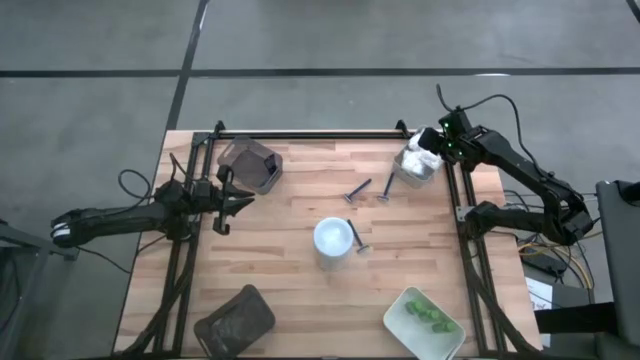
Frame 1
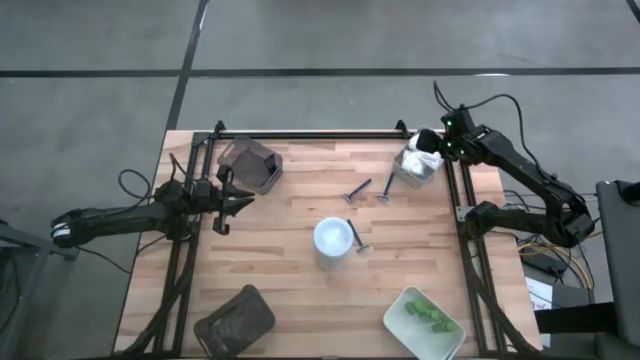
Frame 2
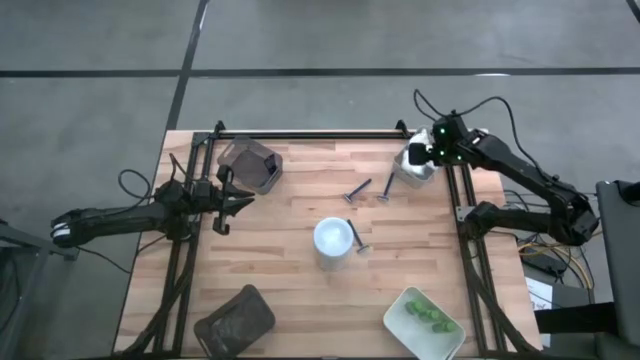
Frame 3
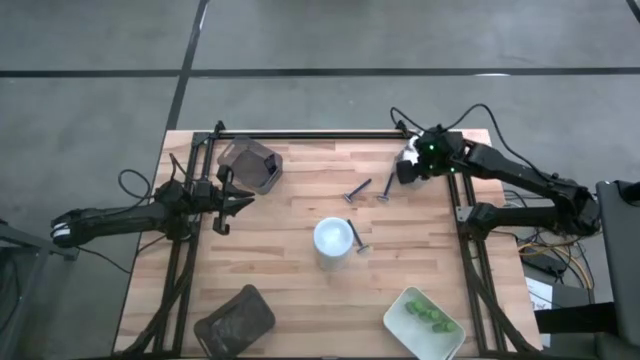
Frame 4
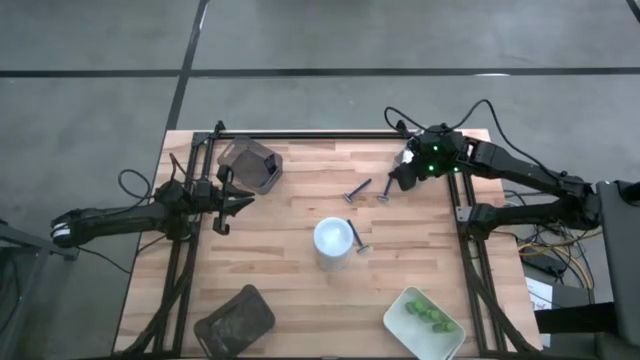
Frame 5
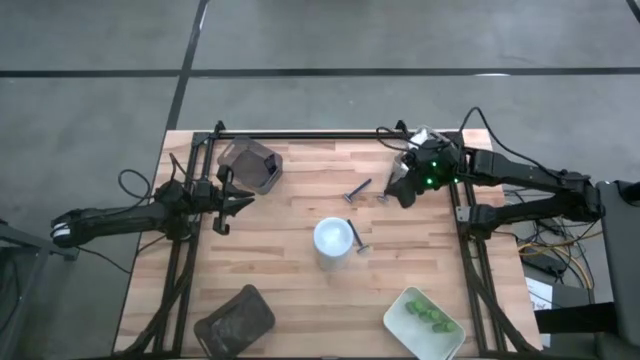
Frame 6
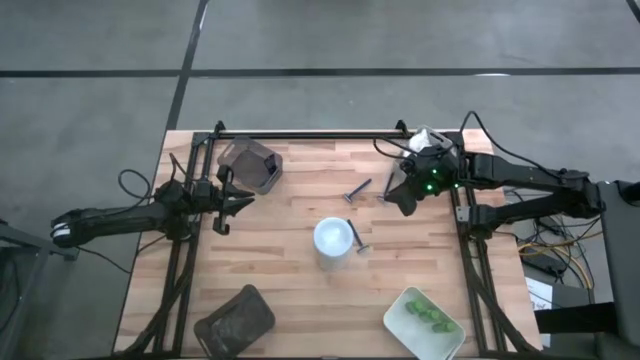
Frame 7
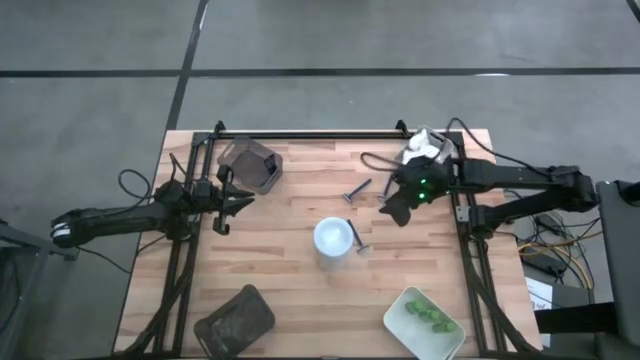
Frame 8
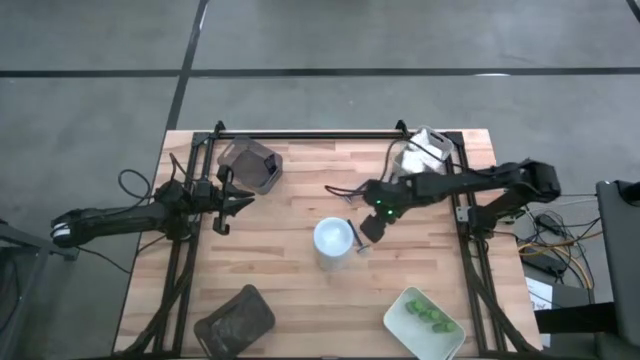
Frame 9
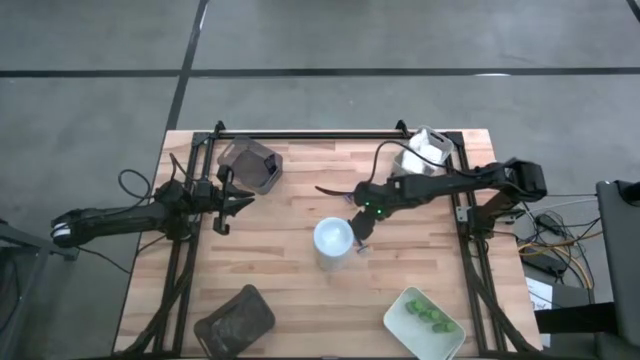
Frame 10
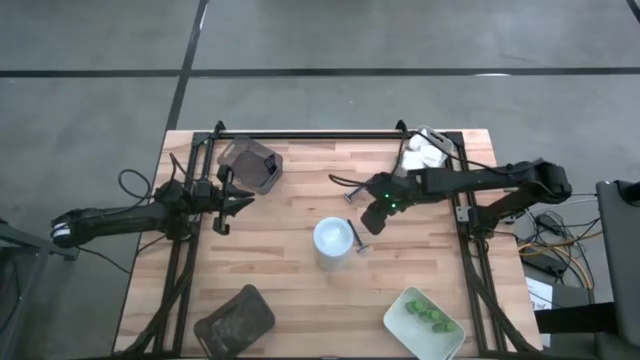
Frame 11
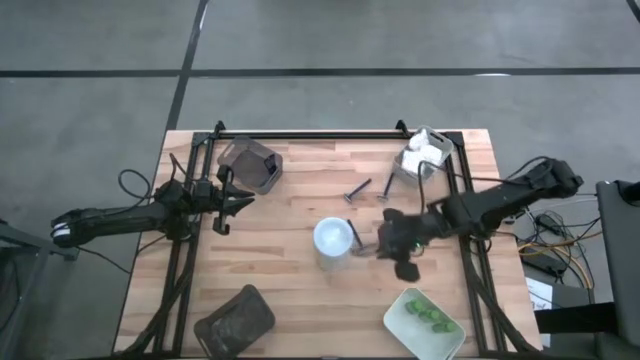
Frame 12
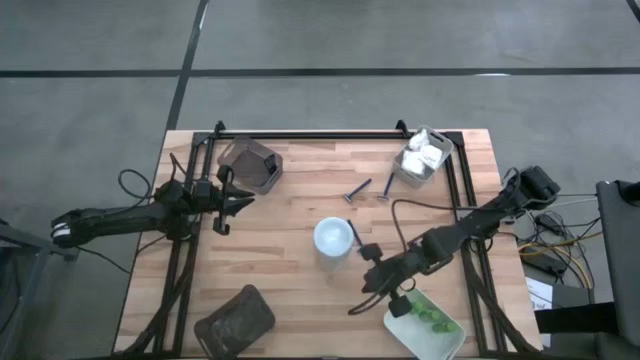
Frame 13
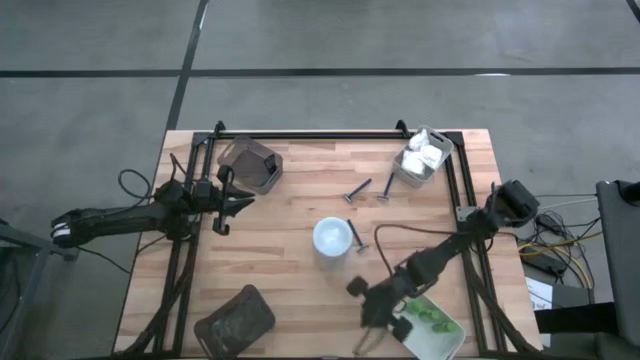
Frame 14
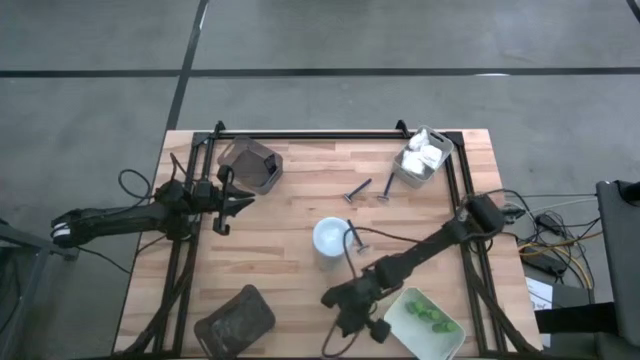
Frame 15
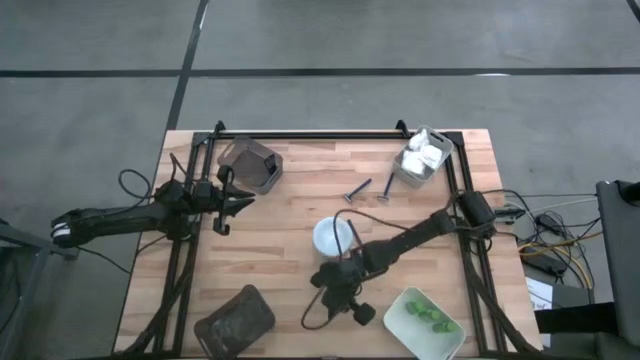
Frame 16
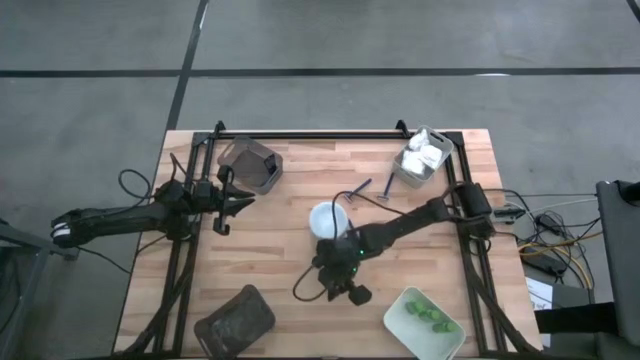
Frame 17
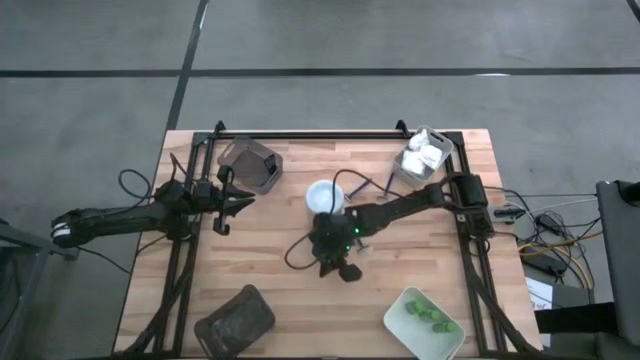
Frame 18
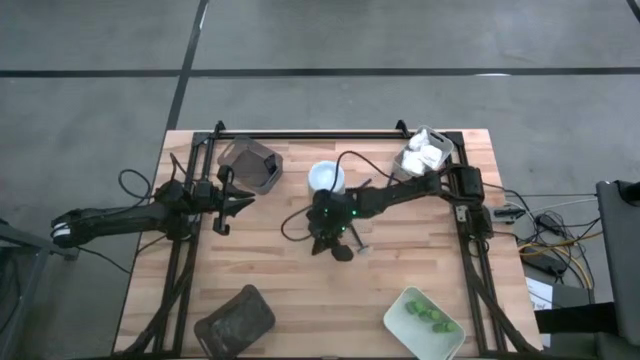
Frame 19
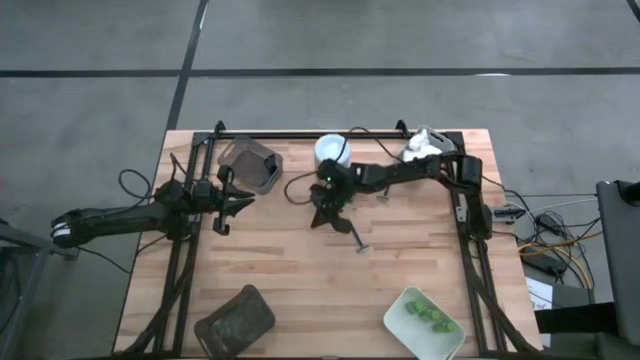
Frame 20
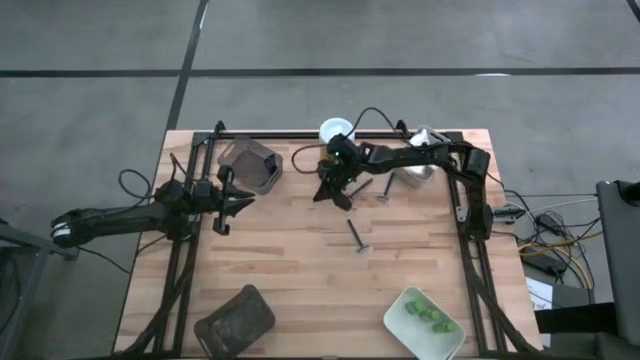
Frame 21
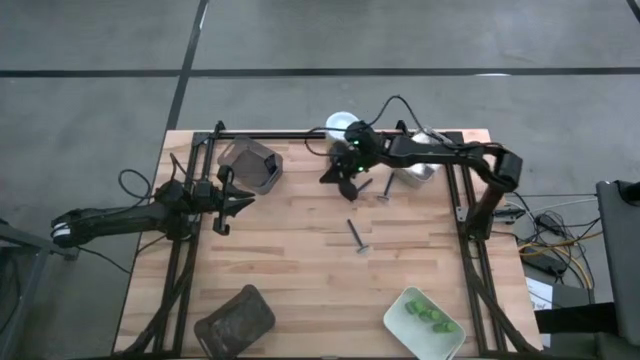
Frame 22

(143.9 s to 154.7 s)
Task: Pick & Place Travel size toiletries
Move the white disinfectant wipes to the top middle of the table

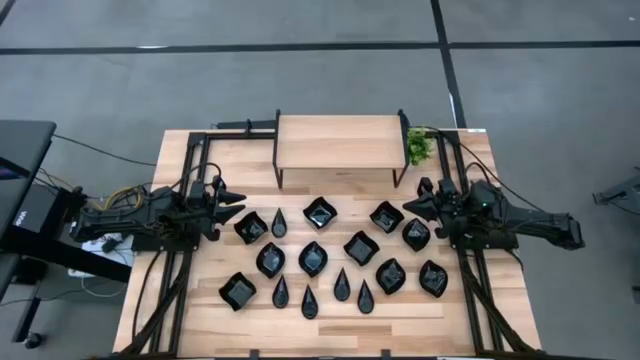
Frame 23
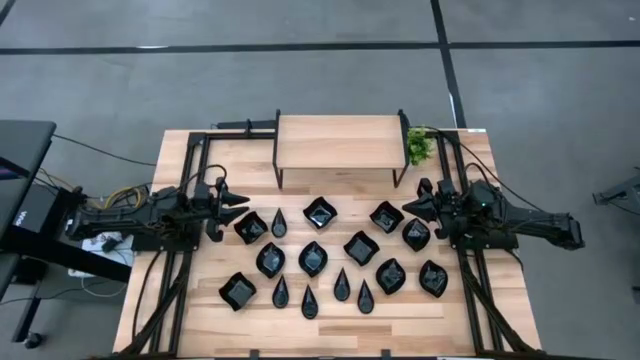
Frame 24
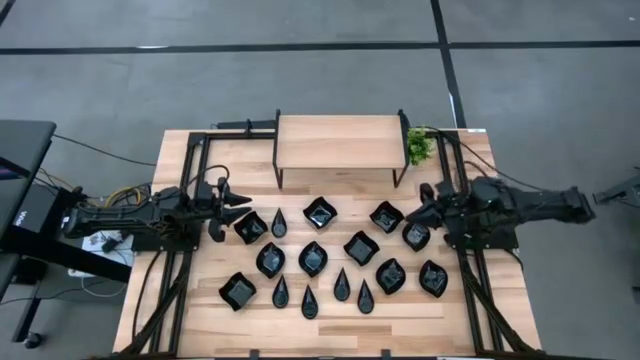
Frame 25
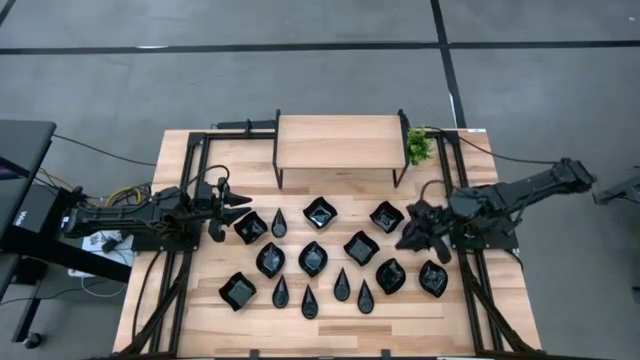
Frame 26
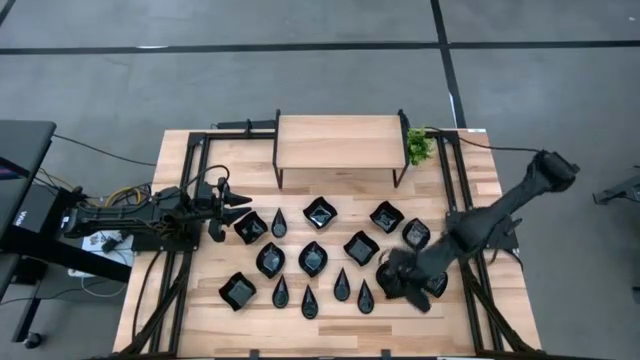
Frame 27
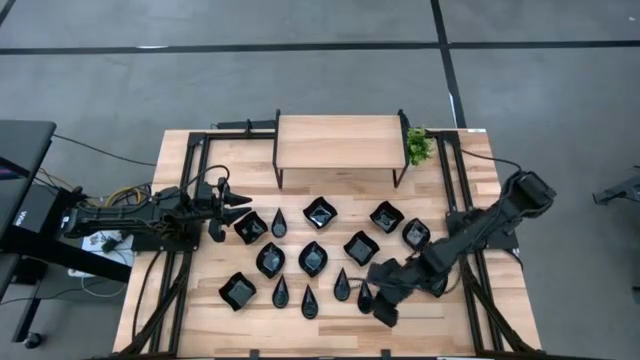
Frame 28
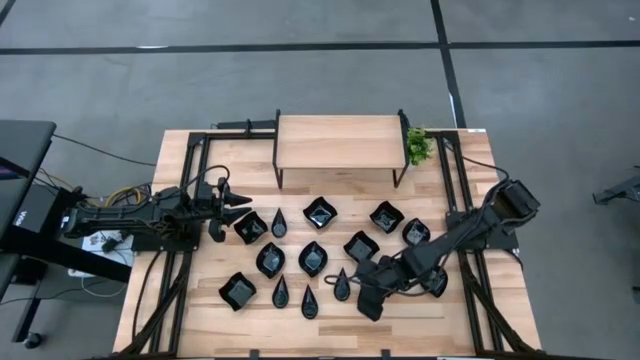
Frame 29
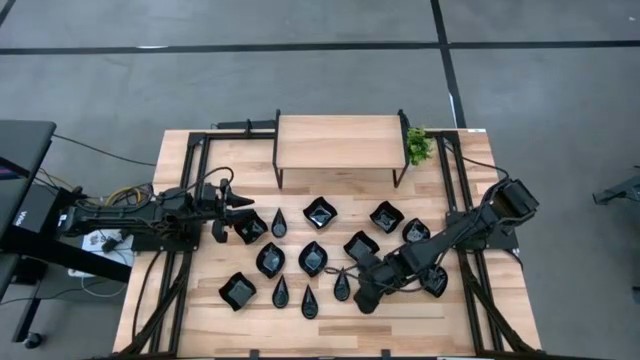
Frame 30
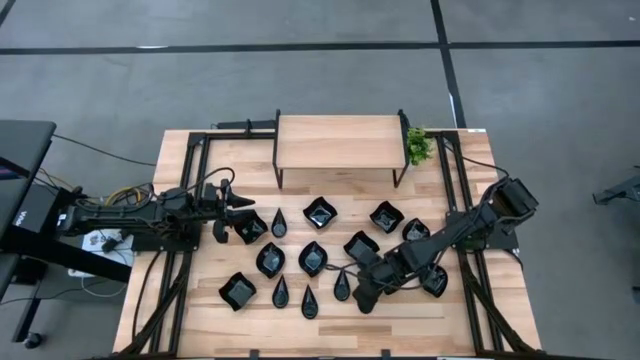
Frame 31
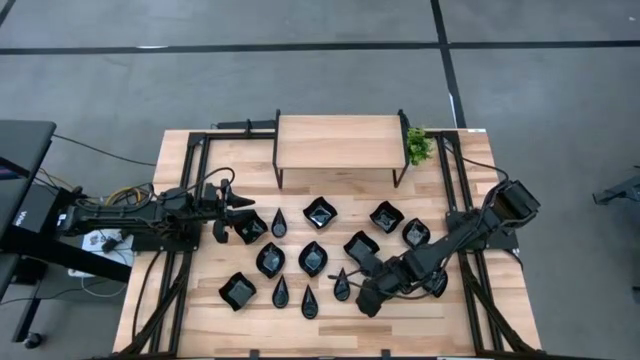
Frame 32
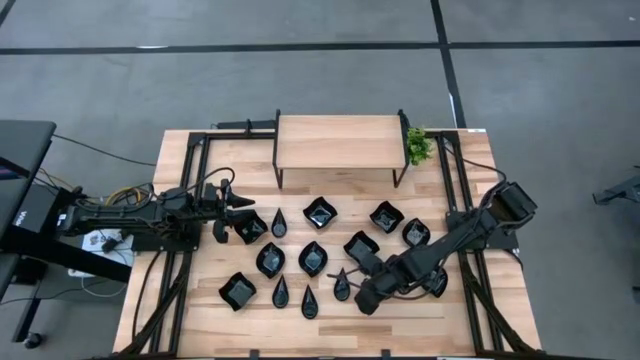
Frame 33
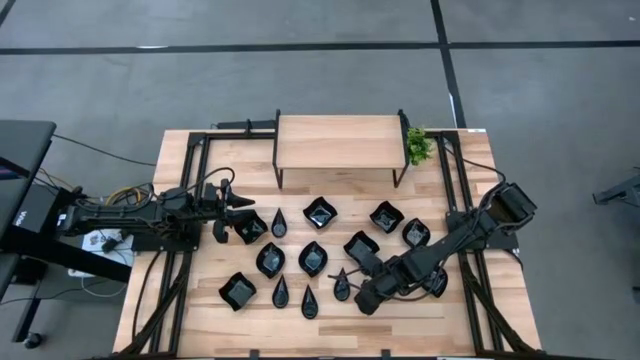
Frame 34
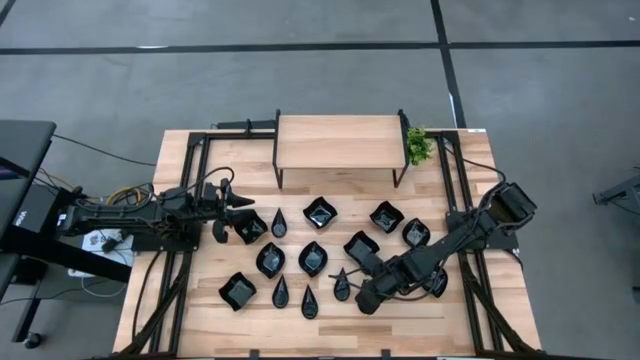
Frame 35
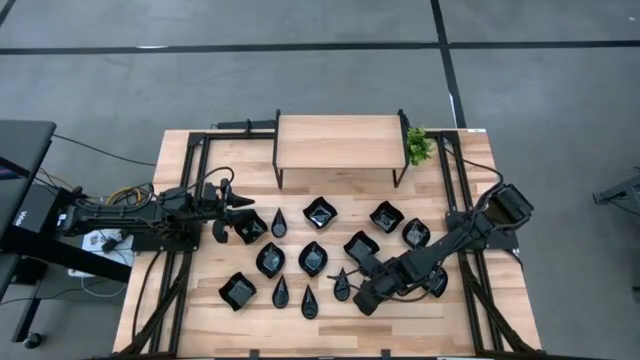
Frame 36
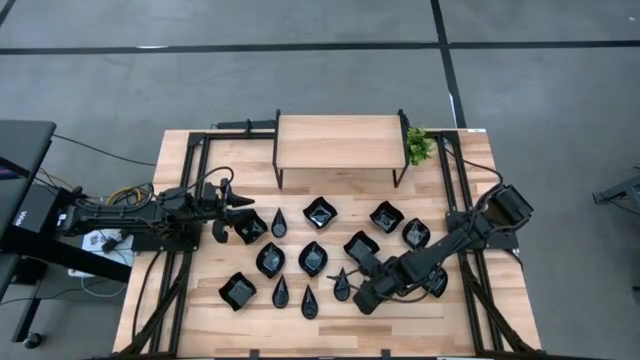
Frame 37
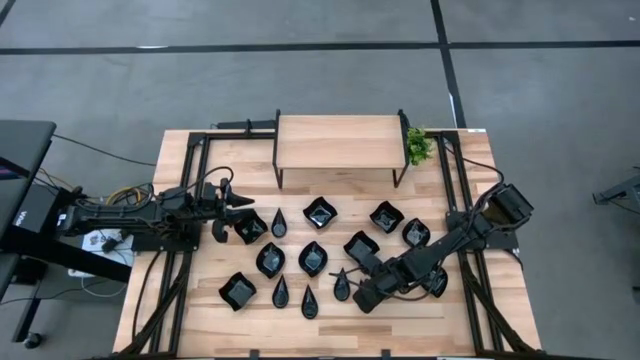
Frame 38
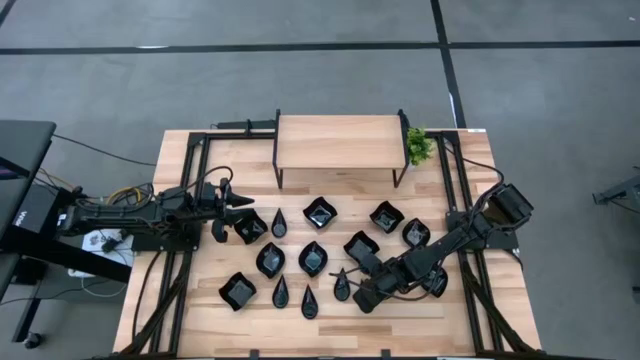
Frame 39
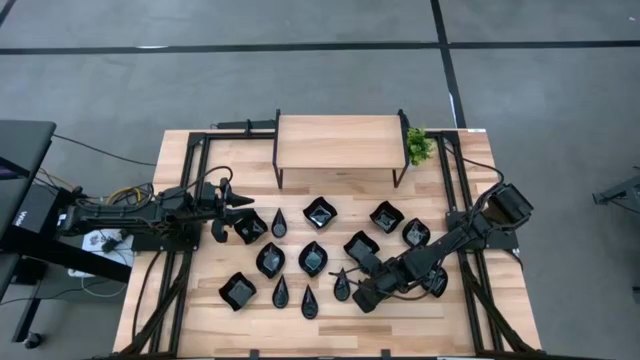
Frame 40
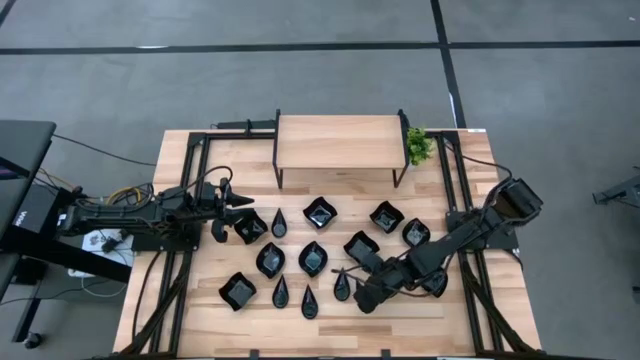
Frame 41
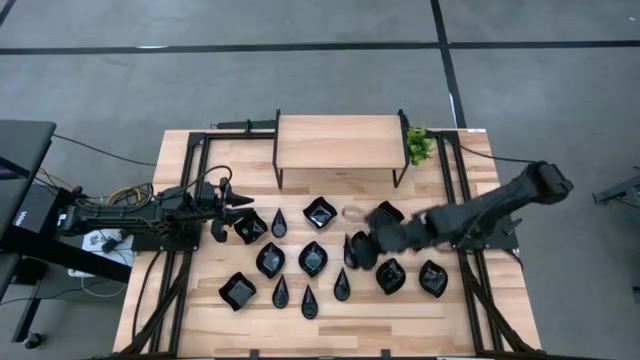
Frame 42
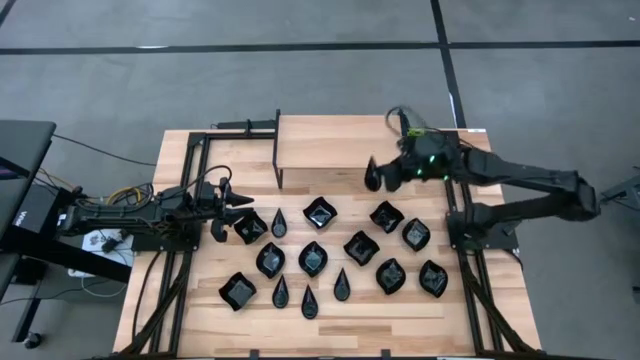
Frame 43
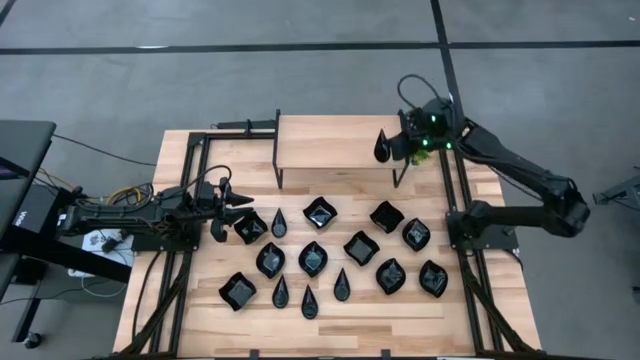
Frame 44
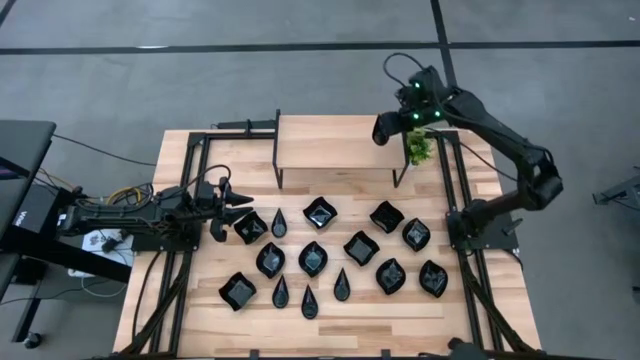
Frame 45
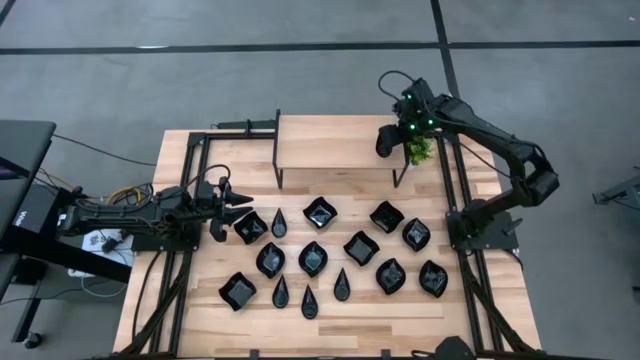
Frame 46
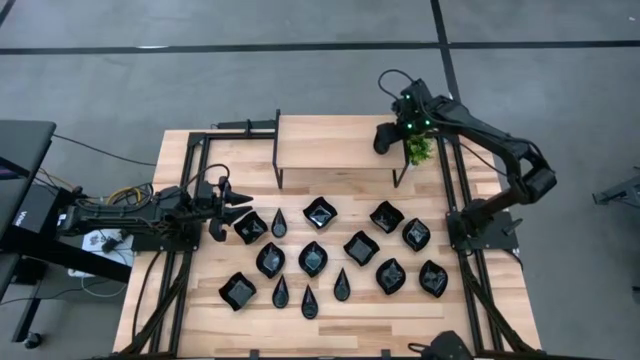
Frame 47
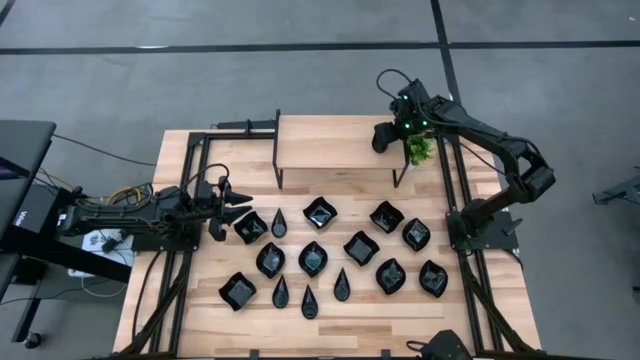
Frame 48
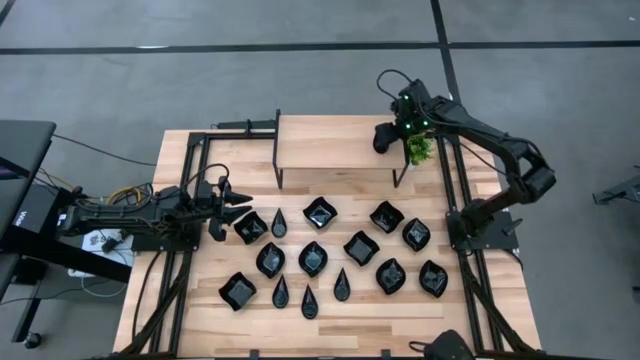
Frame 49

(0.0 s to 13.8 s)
Task: Pick & Place Mini shaped plates
Put the drop-shaped plate on the shelf
